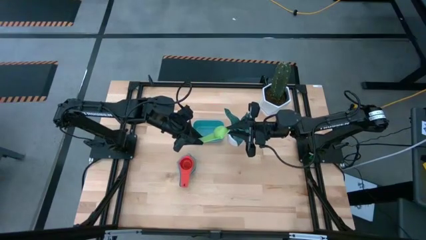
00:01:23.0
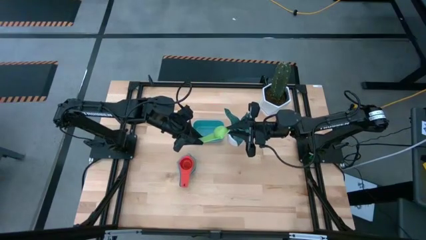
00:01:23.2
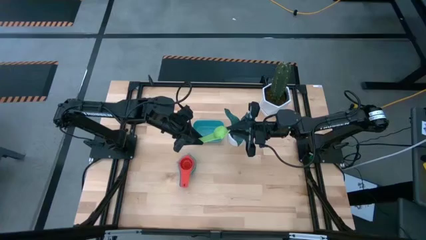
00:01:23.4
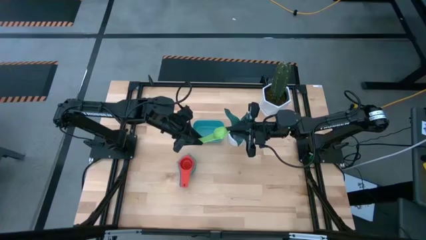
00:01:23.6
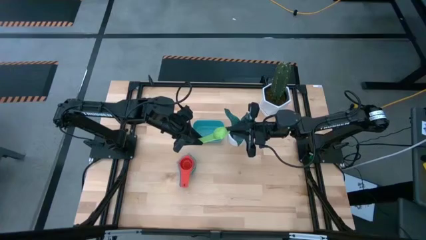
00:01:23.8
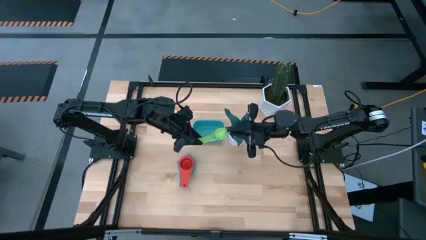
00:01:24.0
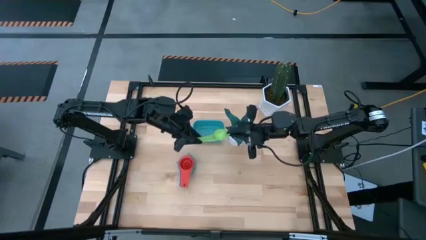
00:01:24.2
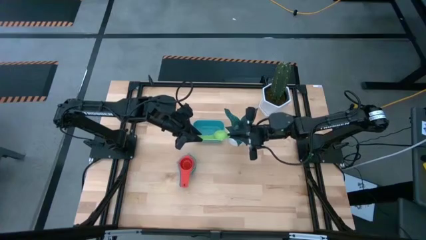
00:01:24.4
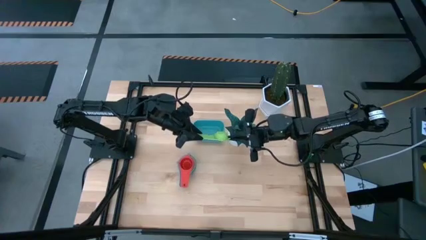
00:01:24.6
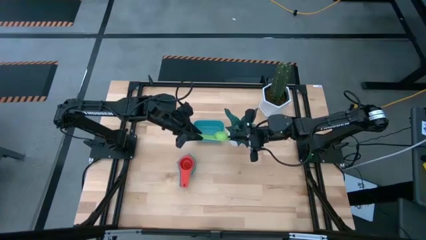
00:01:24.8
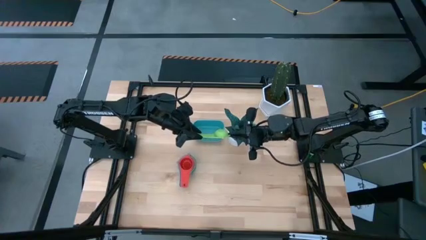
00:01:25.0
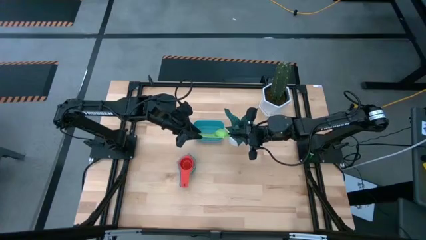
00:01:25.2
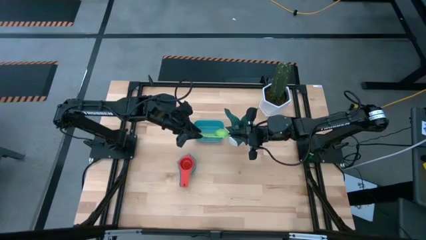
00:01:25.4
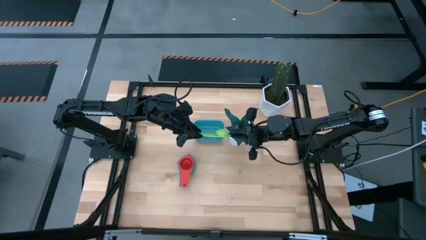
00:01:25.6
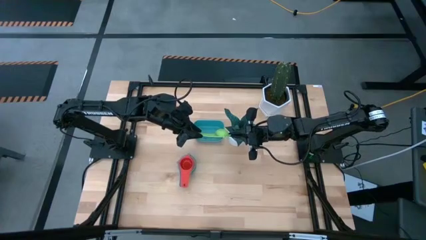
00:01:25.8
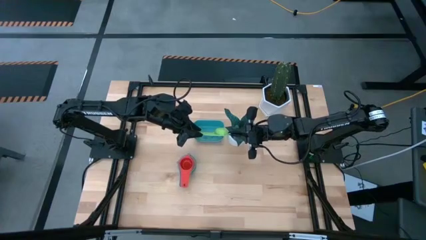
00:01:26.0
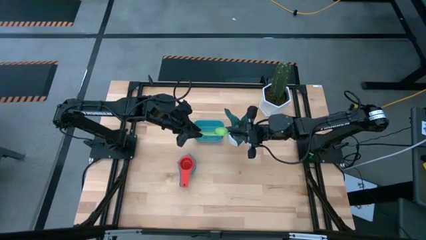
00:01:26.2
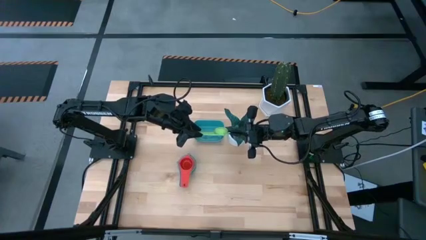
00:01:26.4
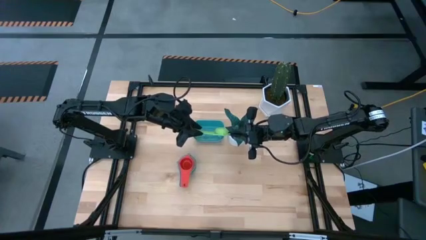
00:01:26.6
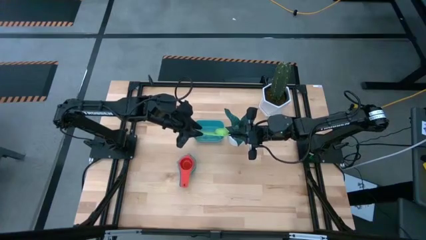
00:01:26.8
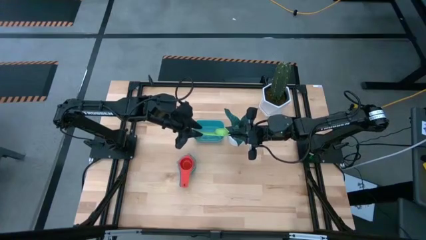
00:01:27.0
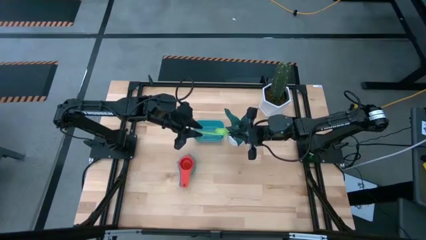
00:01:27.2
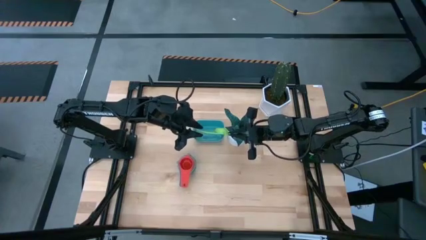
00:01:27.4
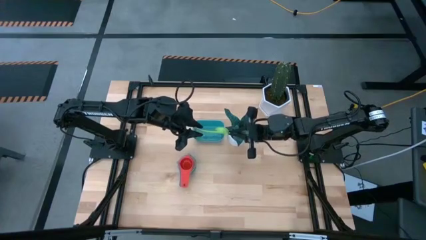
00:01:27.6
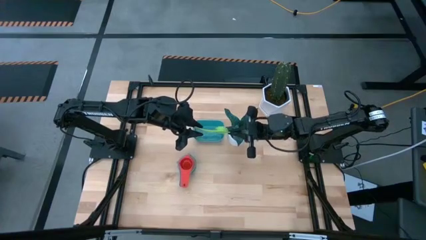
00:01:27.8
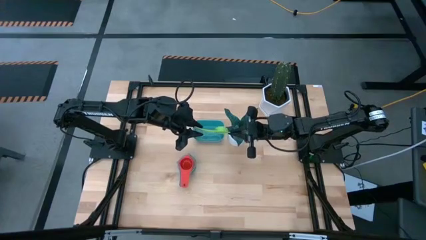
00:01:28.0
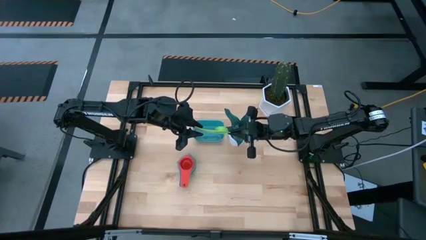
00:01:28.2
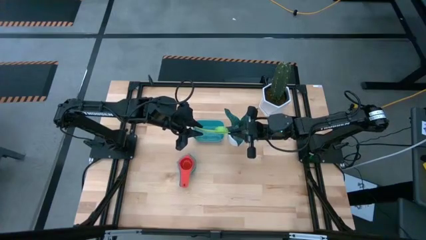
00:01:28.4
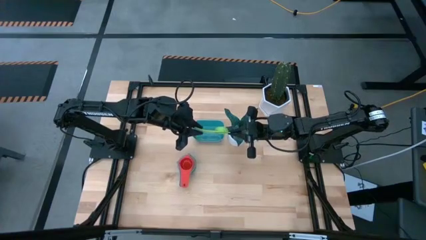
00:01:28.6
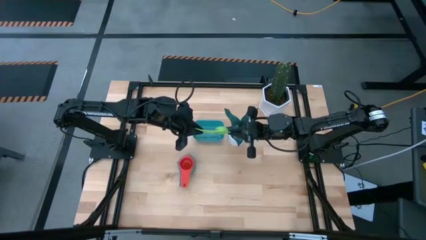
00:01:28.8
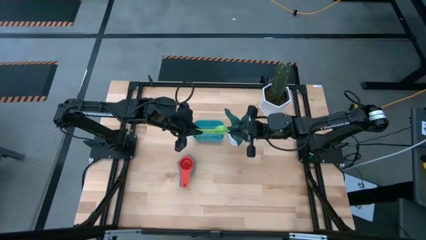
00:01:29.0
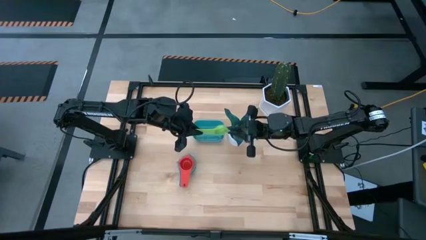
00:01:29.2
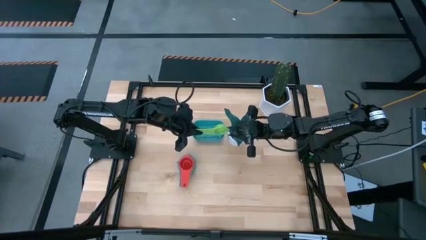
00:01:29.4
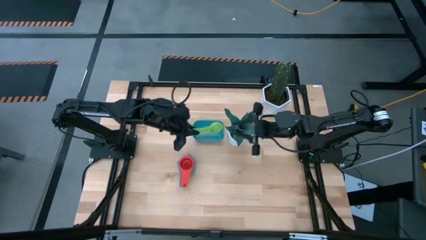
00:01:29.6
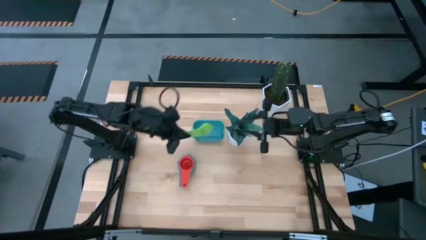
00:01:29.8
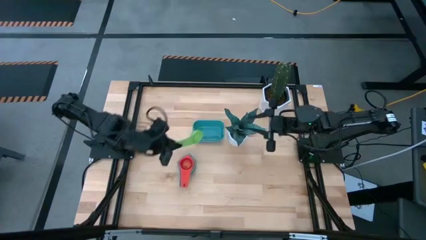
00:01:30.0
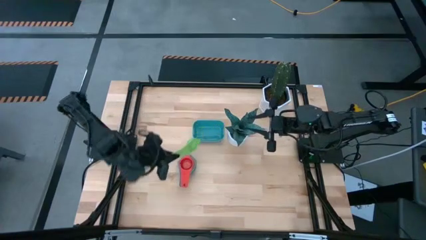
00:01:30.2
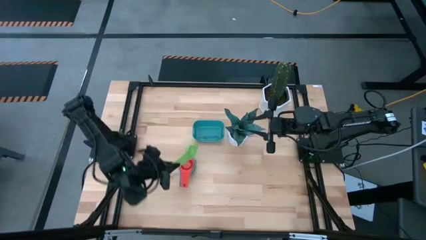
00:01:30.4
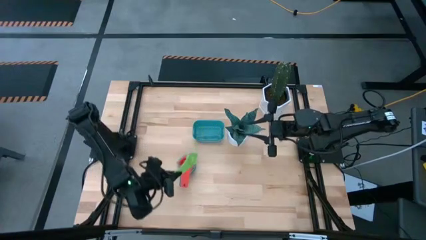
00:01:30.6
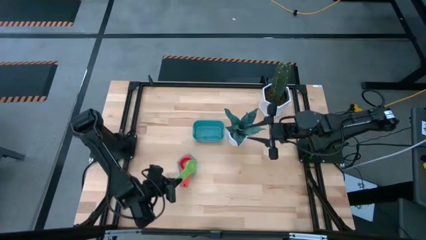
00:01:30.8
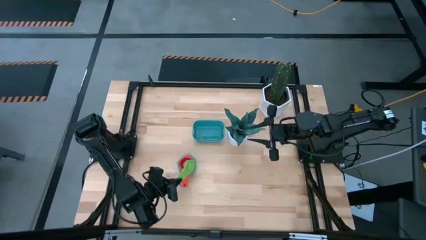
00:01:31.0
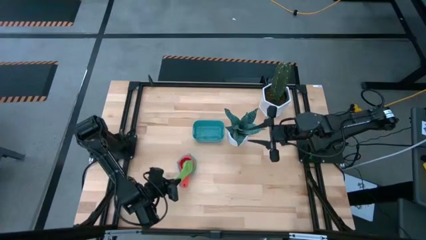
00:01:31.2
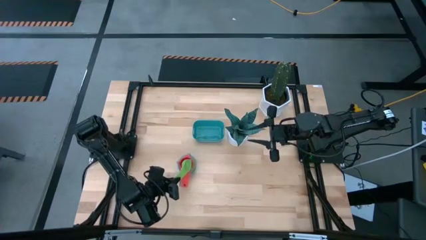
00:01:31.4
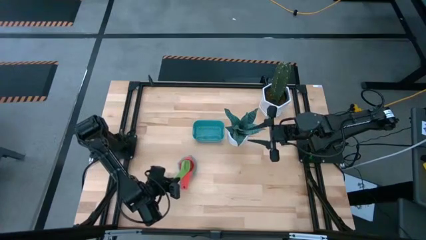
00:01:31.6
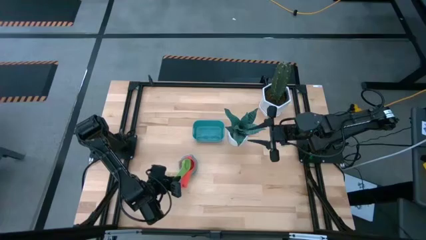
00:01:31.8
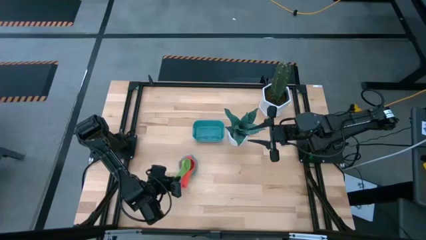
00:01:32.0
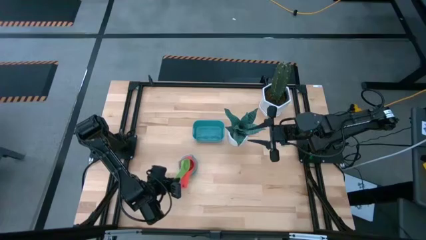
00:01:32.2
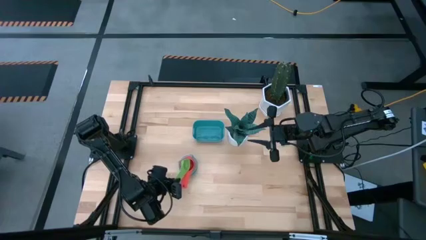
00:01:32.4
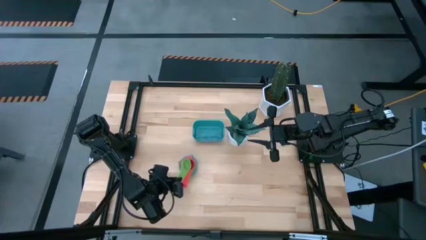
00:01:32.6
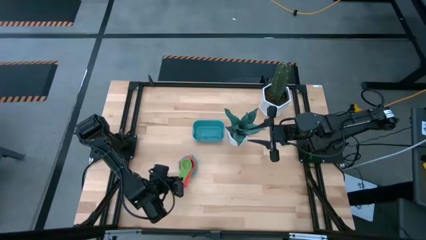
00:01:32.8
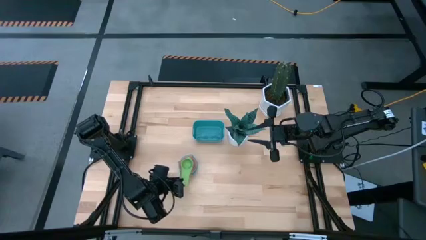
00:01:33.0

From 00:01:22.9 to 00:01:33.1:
Task: Nest measuring cups in basket
Stack the green measuring cup on top of the red measuring cup

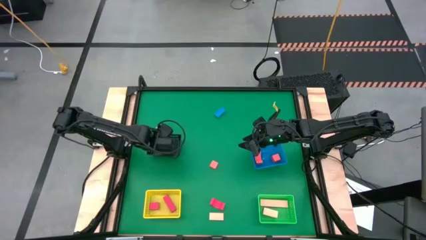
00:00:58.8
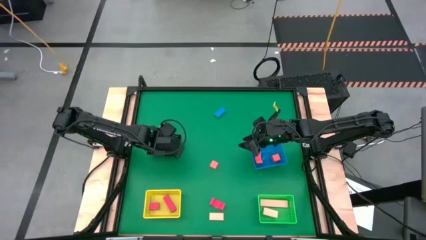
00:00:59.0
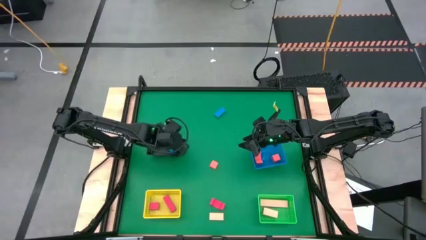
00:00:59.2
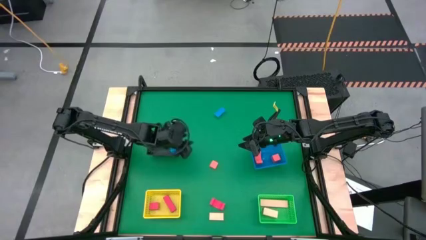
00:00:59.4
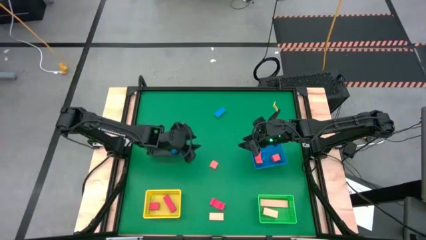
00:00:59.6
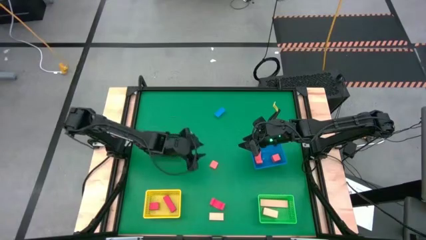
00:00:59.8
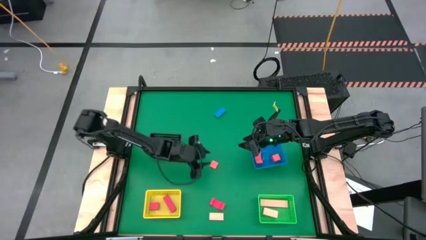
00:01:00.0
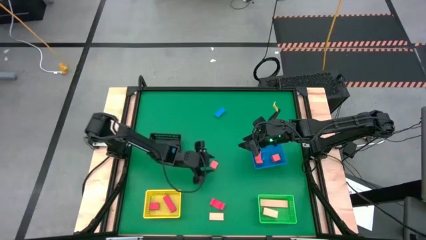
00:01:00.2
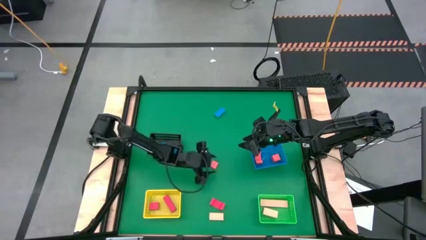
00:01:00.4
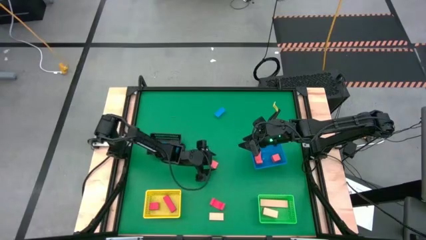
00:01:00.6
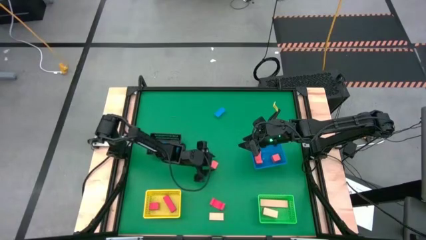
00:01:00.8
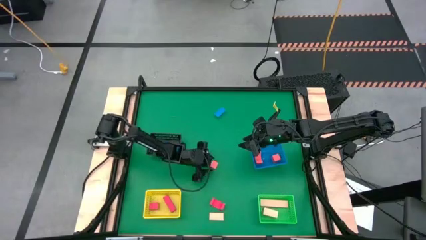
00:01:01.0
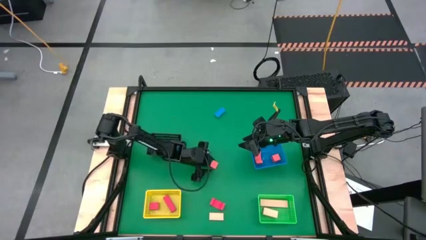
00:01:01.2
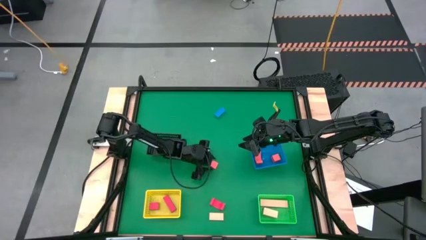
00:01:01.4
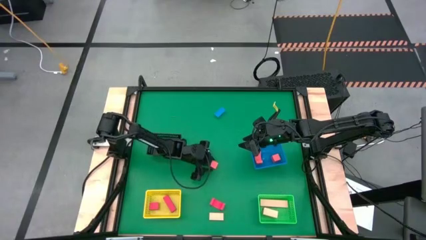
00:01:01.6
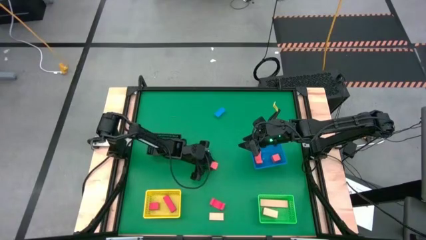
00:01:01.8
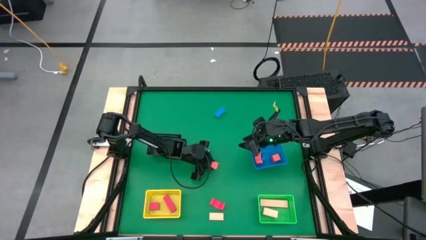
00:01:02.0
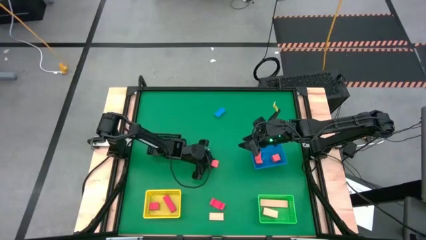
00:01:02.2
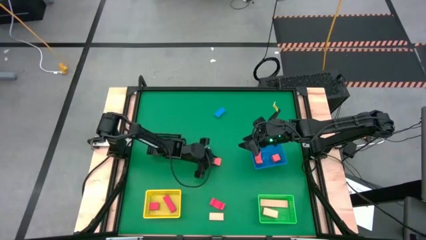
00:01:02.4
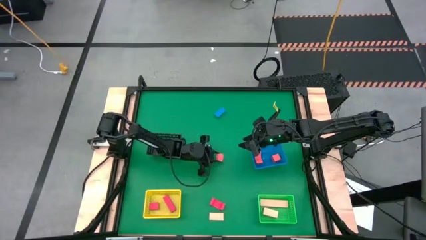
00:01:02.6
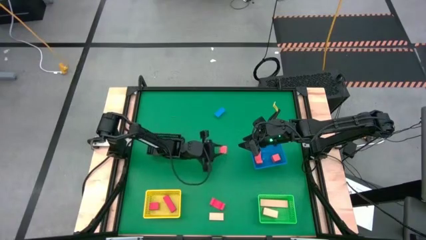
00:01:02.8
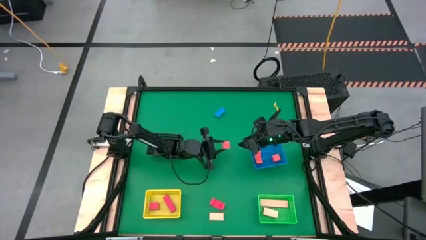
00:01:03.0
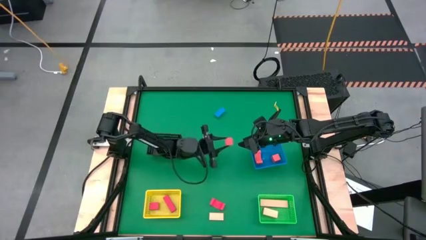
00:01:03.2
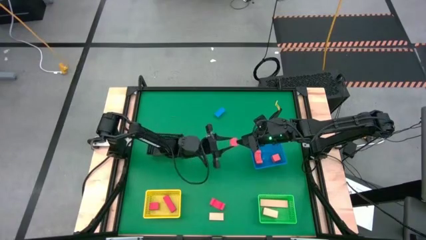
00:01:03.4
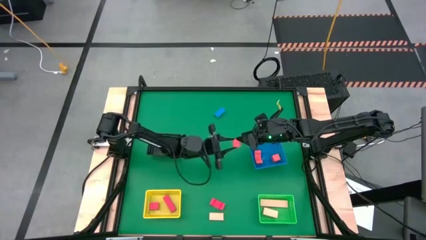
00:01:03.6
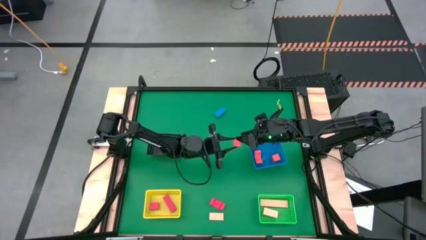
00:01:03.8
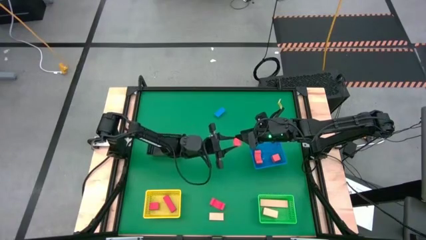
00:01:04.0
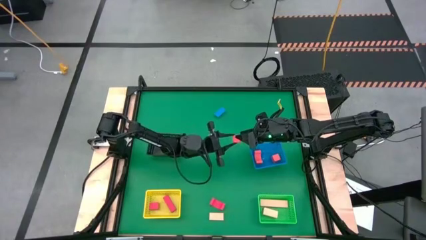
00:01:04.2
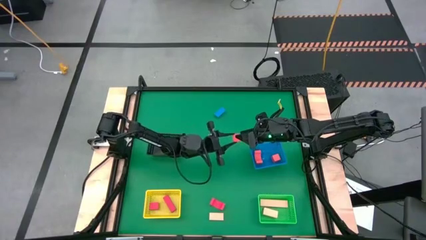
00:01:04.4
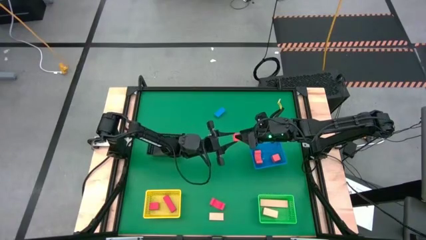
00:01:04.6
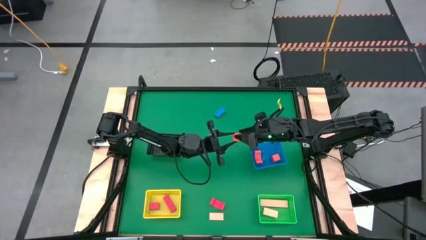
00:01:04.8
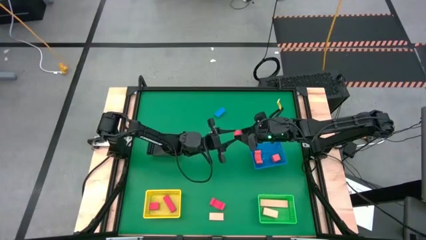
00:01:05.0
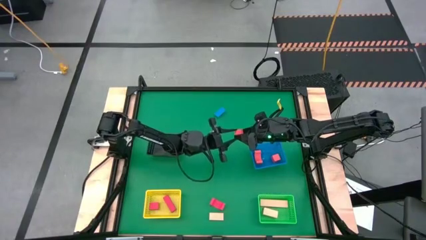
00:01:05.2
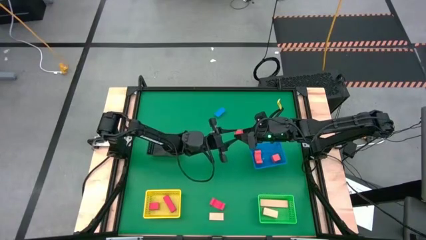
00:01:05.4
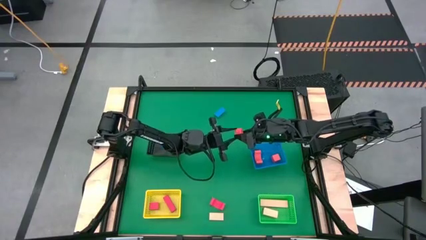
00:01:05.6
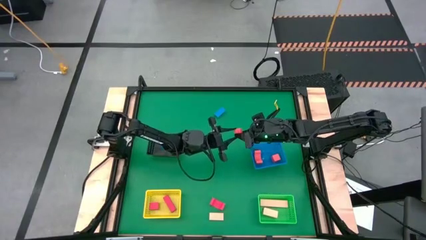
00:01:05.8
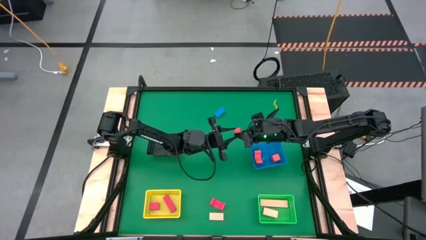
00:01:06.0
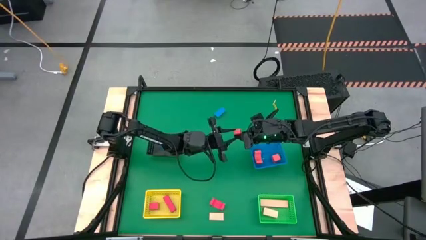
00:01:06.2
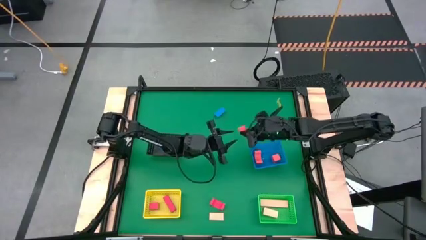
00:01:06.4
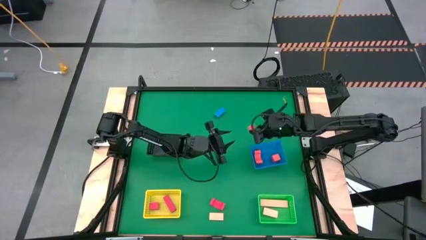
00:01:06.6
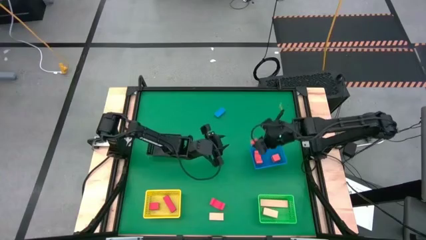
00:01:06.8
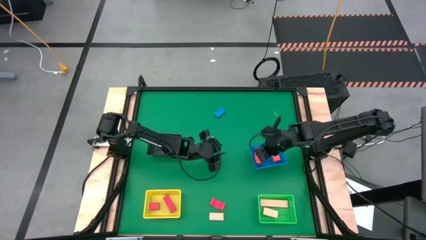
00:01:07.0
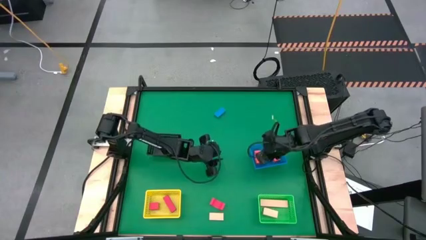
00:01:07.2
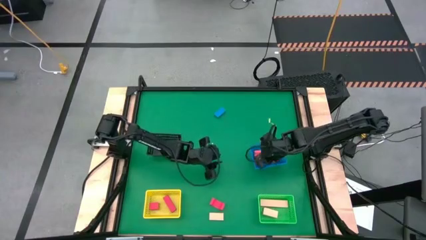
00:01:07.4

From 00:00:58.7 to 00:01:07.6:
Task: Sort & place blocks by color
Put the orange block into the blue bin
